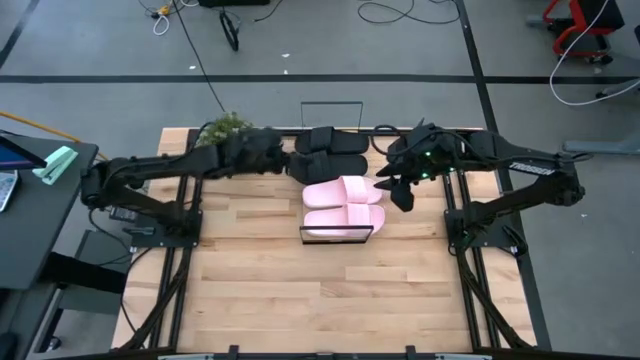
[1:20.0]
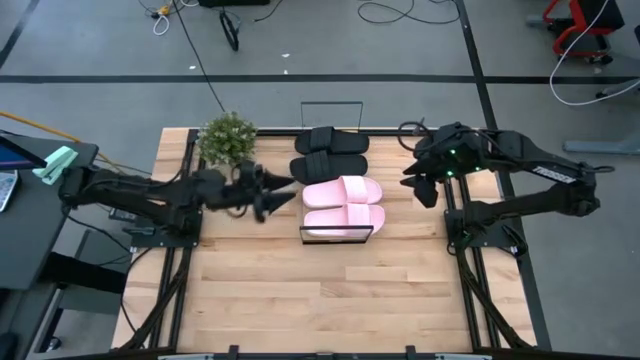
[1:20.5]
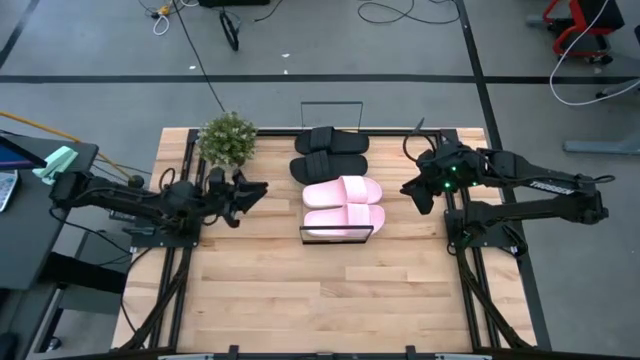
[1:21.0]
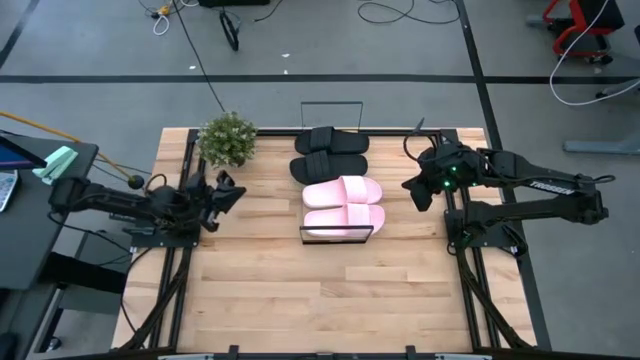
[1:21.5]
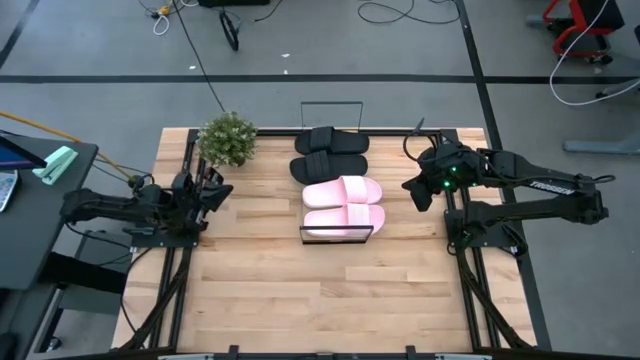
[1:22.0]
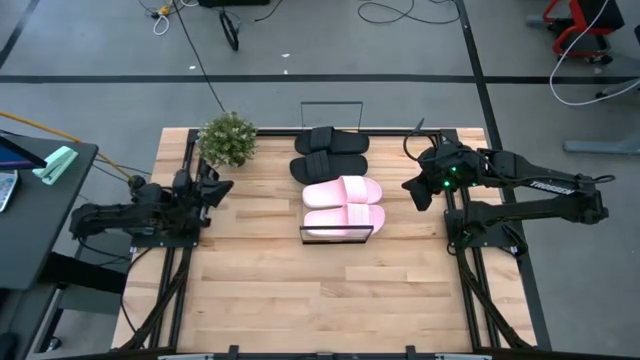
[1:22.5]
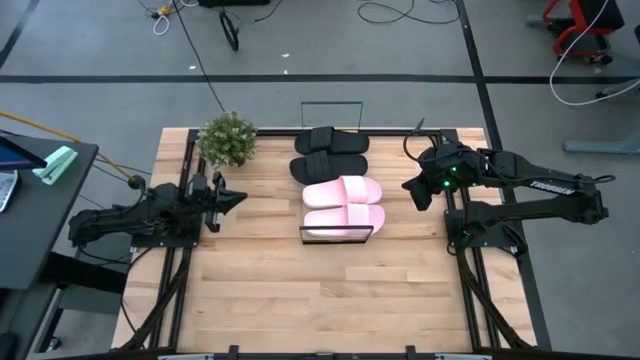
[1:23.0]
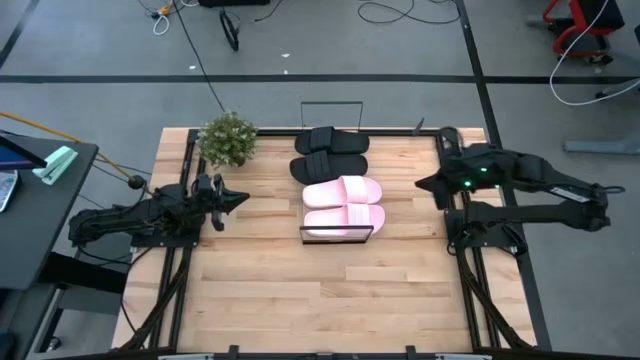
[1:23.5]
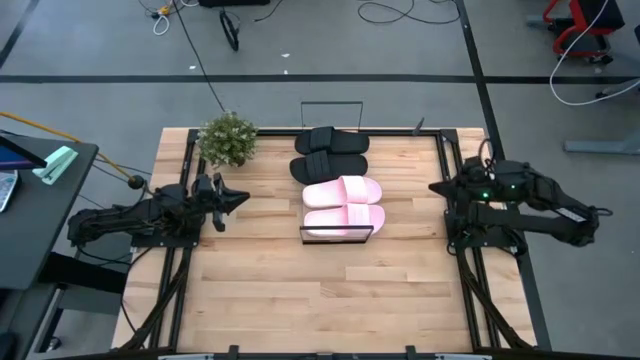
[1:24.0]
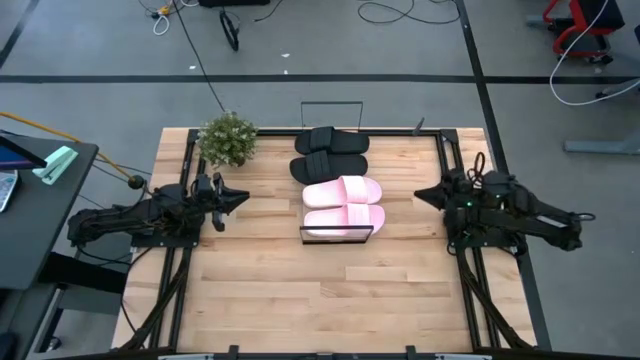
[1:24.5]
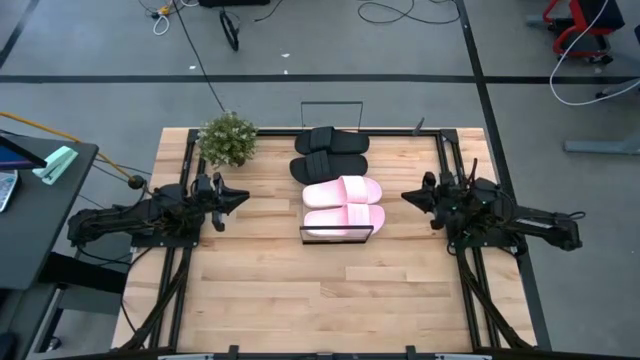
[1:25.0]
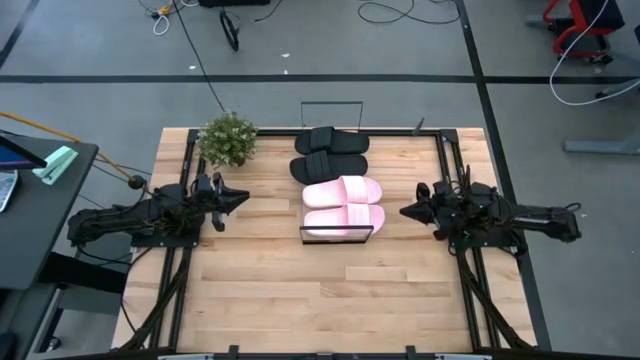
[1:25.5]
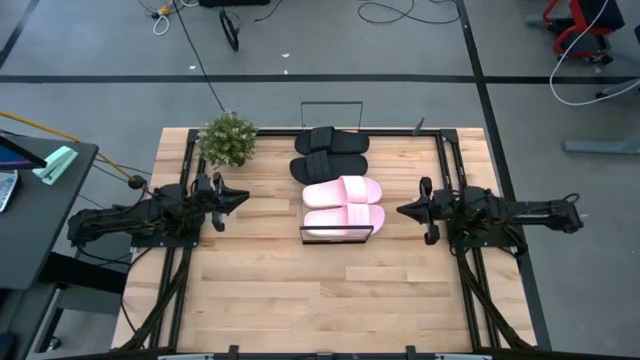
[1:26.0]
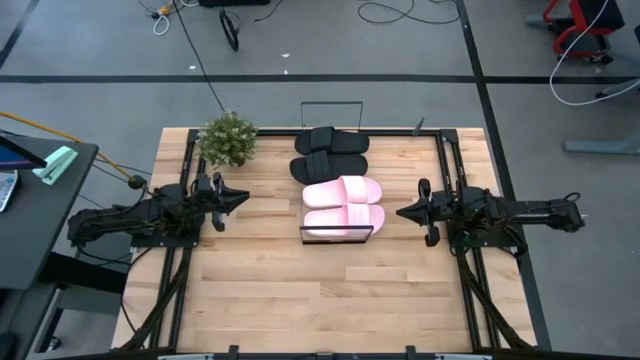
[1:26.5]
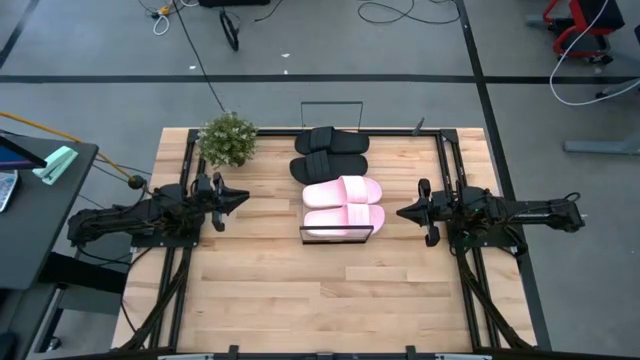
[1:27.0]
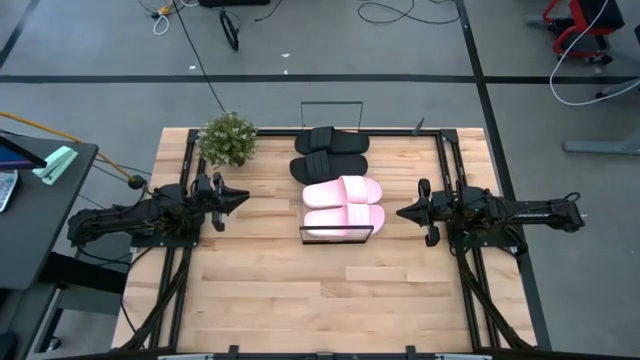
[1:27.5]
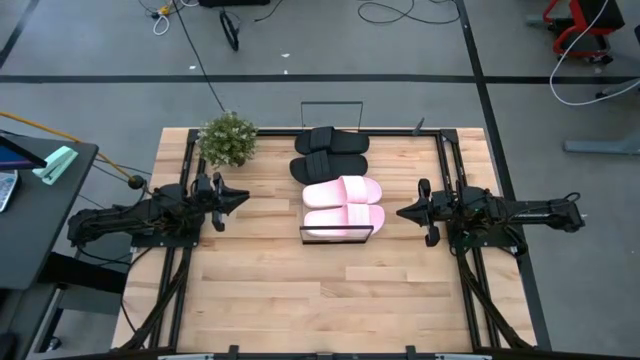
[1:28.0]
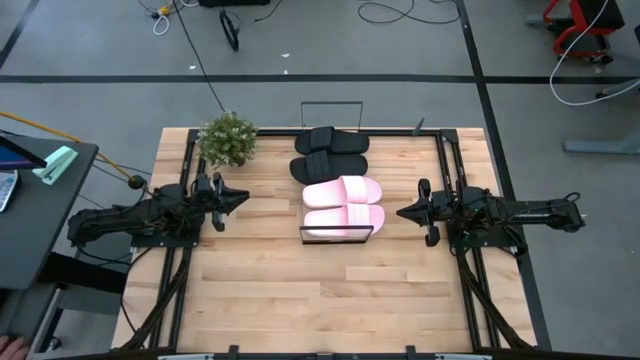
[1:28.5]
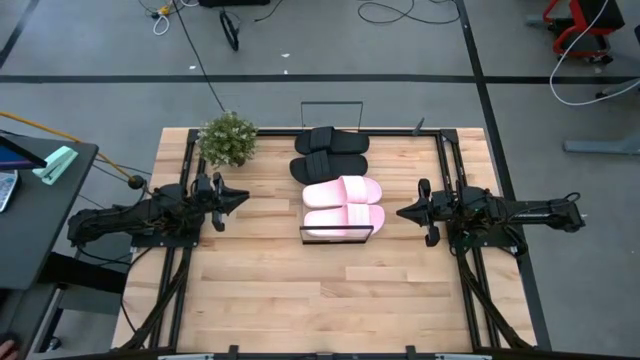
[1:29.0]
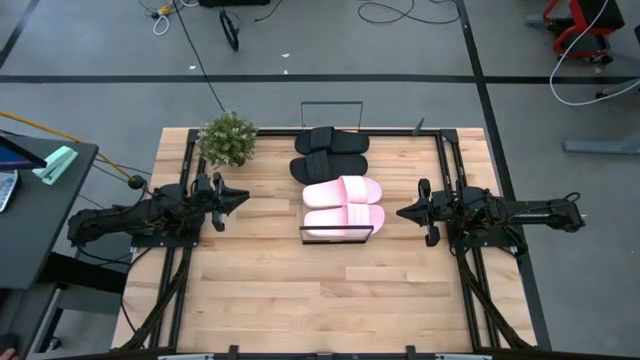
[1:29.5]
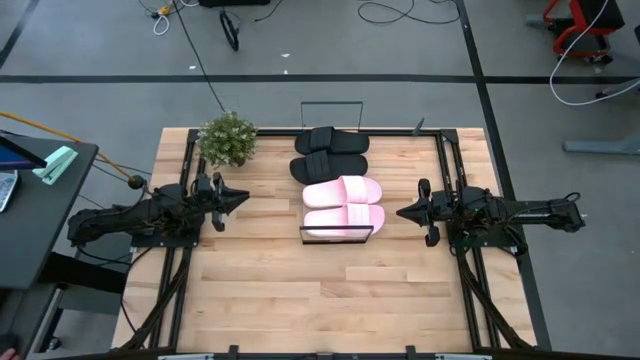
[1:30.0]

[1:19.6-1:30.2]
Task: Pick and place slides into the shelf
Return to Home Position

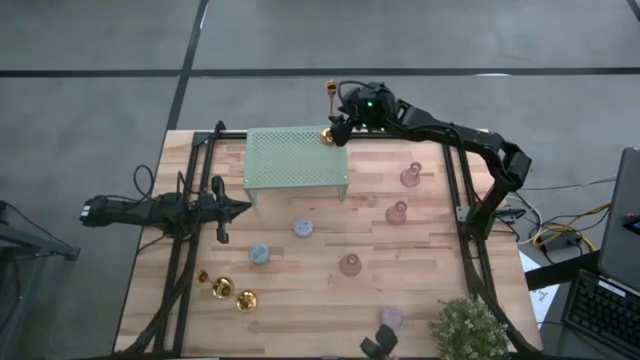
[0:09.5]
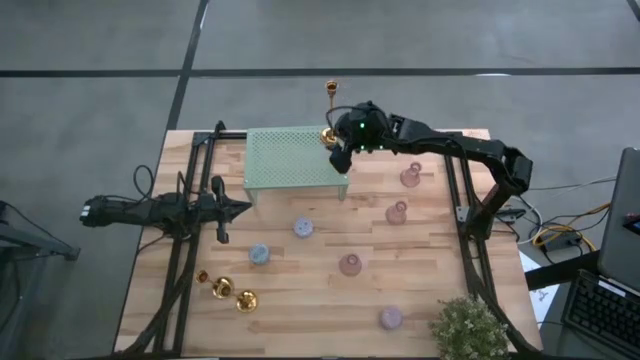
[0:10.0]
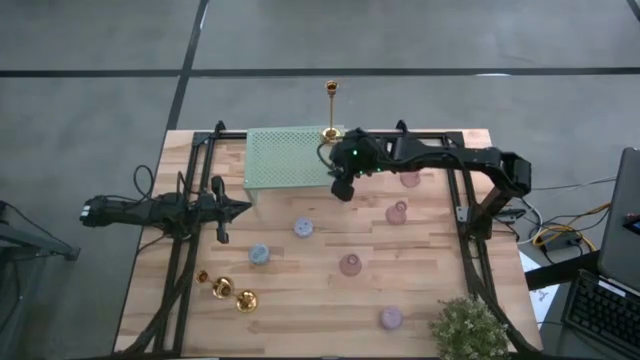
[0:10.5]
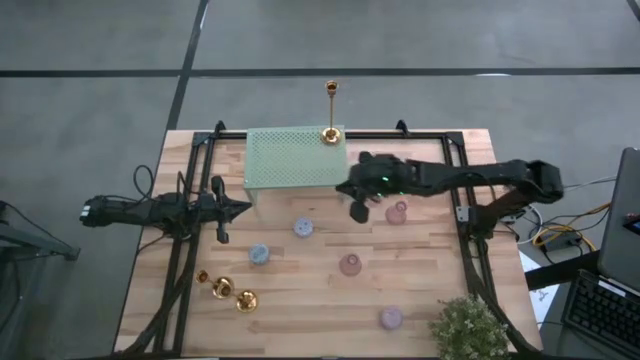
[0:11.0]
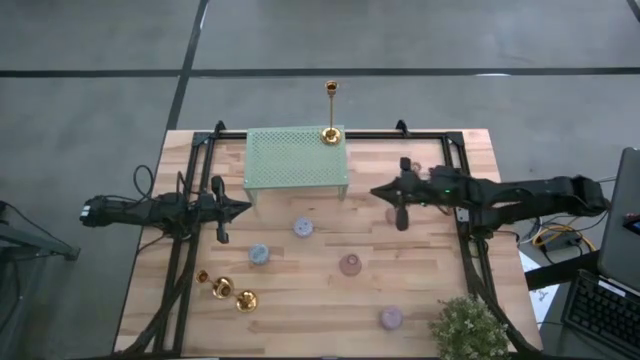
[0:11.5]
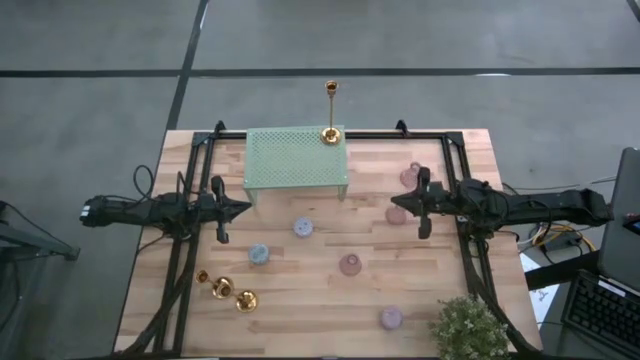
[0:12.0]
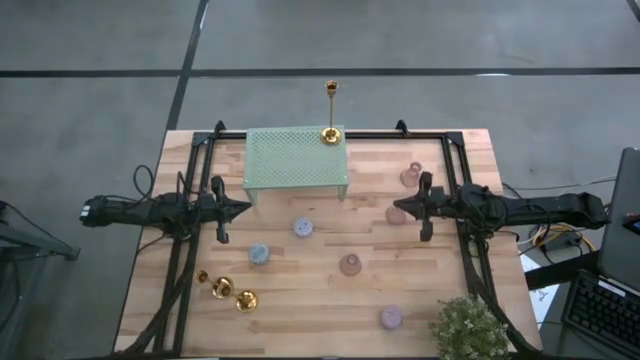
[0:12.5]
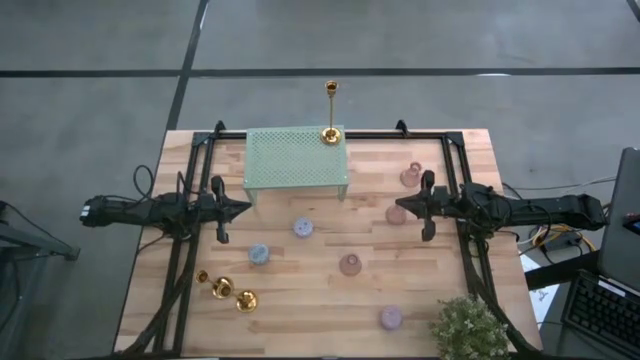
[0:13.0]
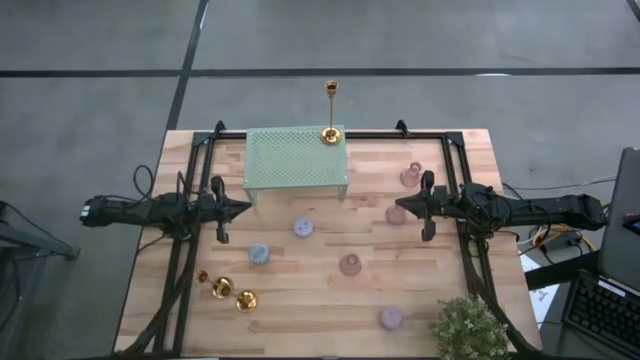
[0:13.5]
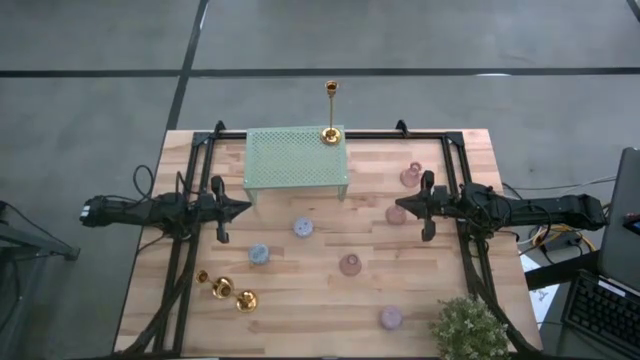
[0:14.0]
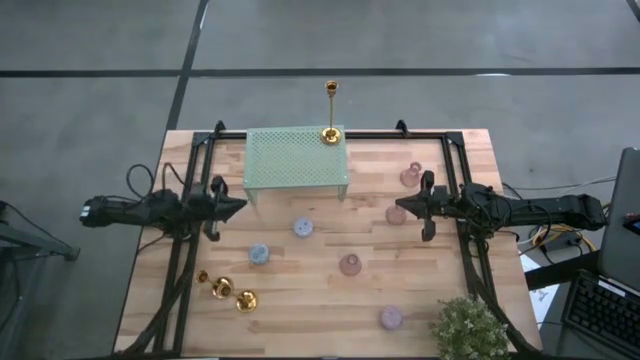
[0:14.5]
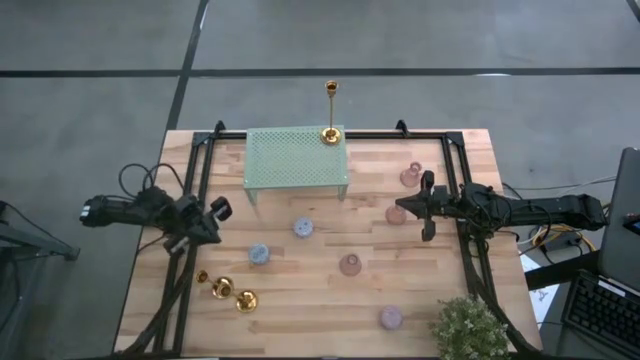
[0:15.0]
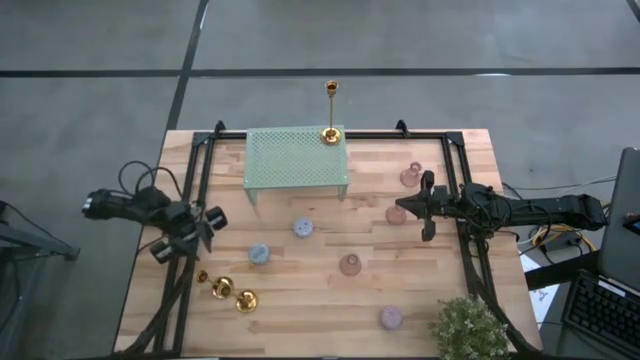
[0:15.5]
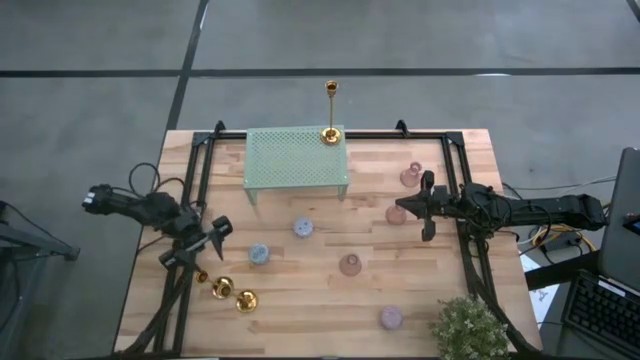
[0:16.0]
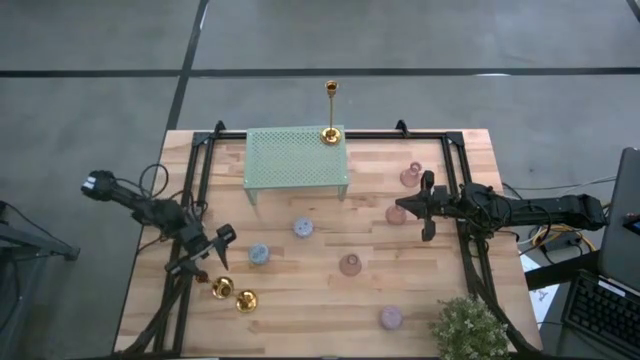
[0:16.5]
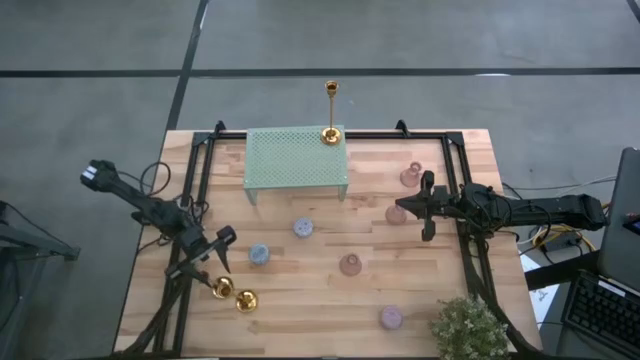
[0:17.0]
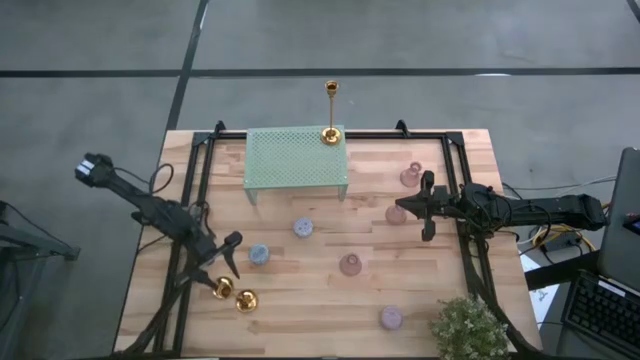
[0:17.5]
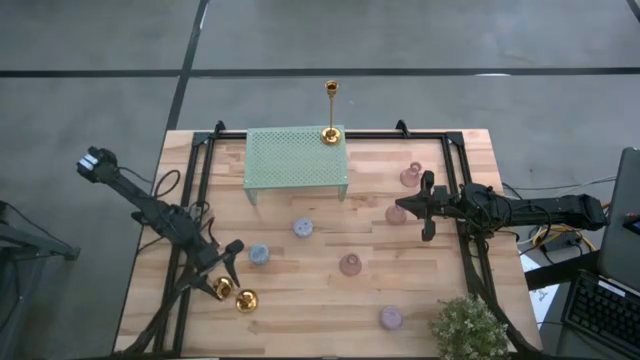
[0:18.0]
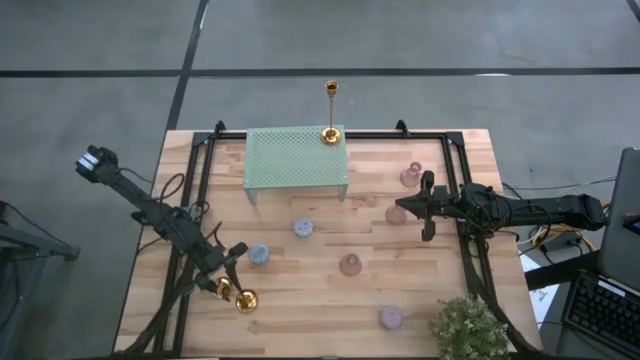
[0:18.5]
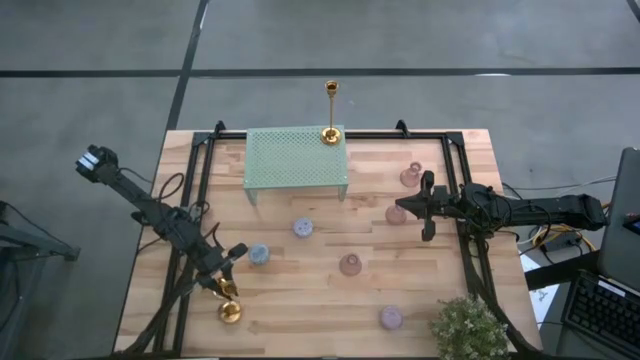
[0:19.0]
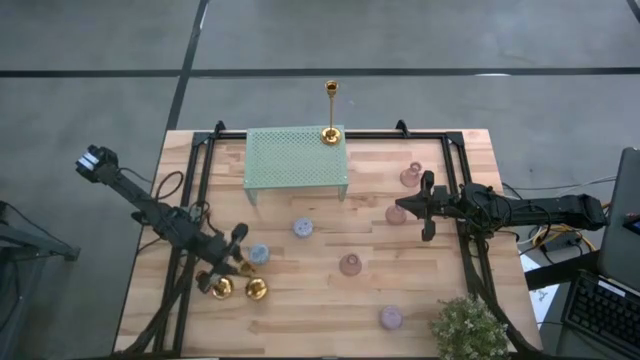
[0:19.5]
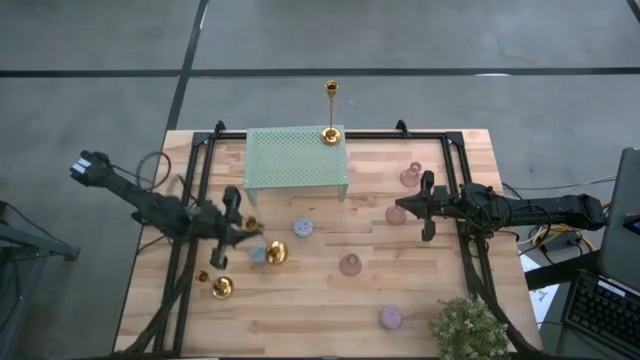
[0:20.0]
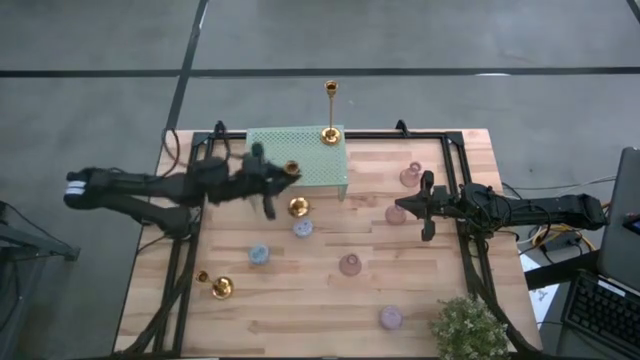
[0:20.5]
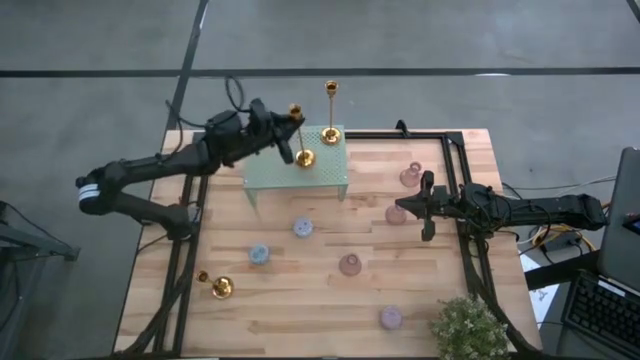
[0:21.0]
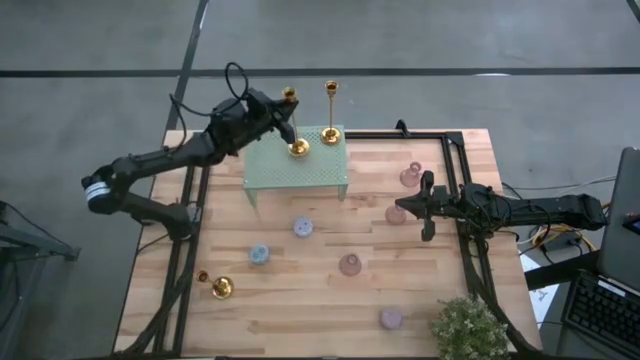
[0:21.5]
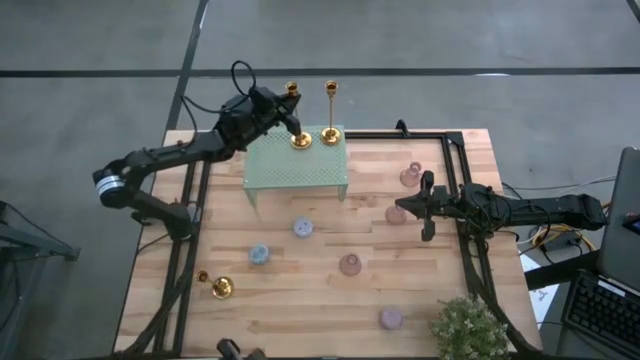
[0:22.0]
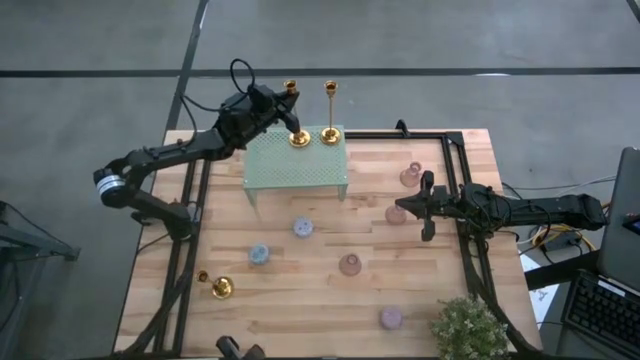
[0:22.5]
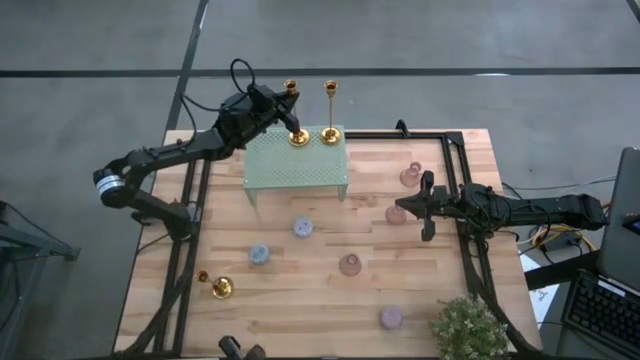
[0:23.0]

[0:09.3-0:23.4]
Task: Pick & Place candle stick holders
Put the right gold candle holder on the shelf
